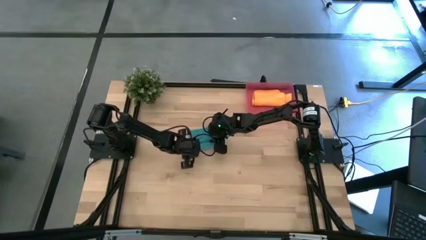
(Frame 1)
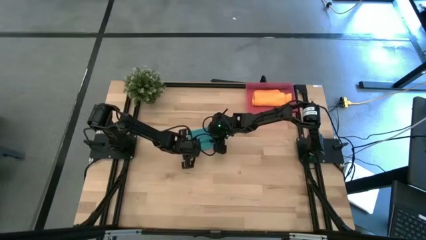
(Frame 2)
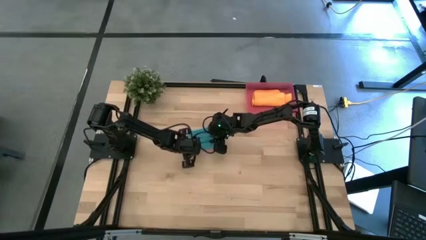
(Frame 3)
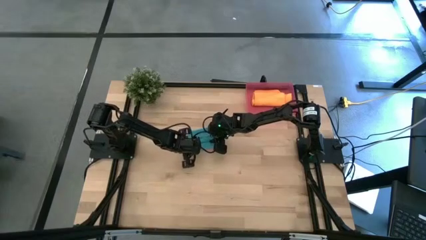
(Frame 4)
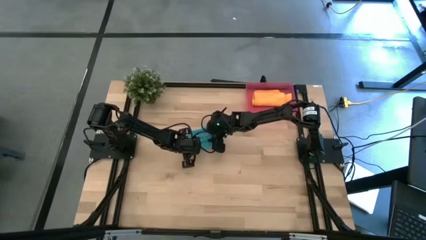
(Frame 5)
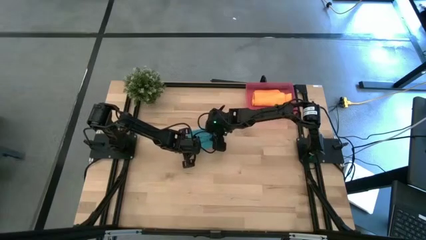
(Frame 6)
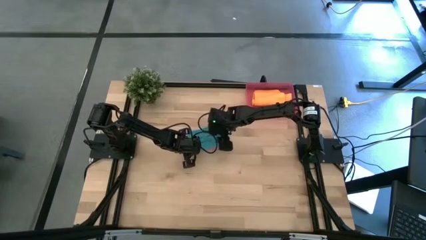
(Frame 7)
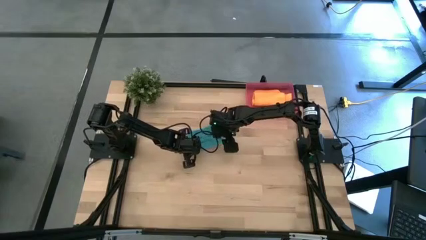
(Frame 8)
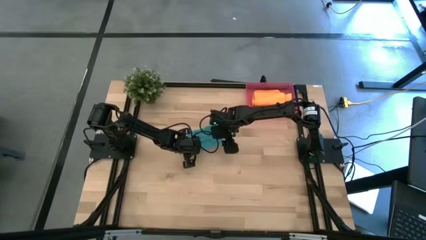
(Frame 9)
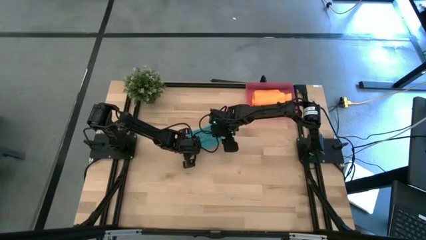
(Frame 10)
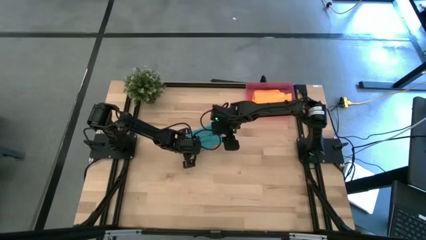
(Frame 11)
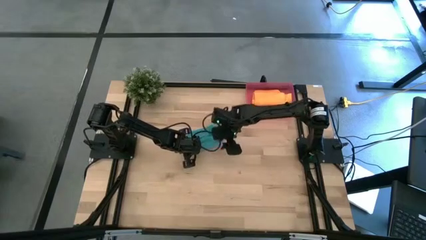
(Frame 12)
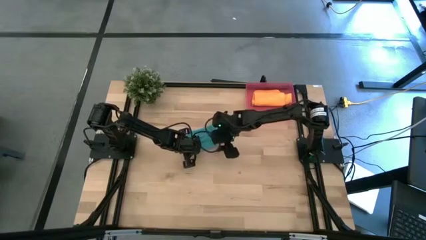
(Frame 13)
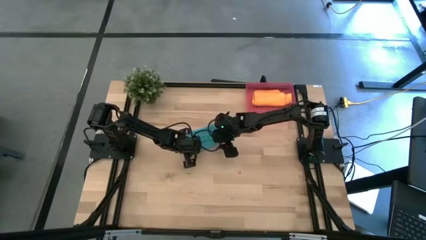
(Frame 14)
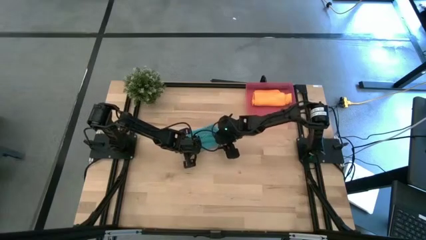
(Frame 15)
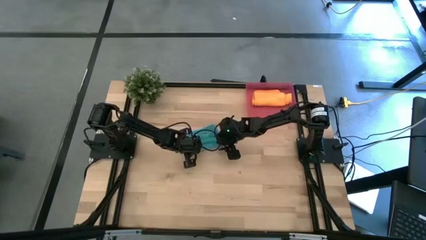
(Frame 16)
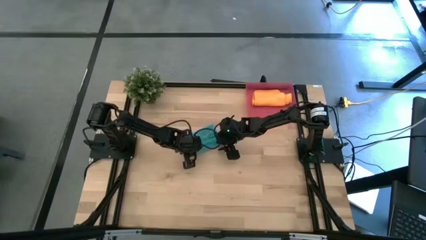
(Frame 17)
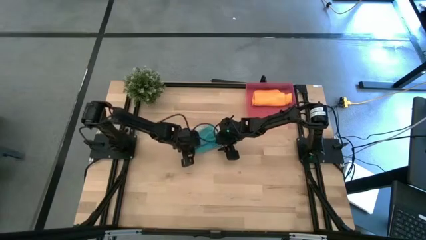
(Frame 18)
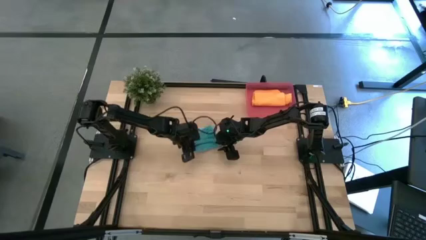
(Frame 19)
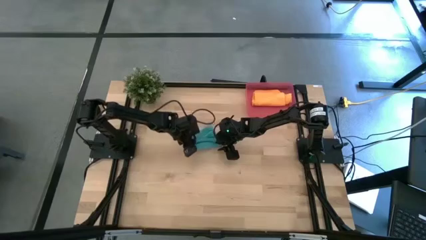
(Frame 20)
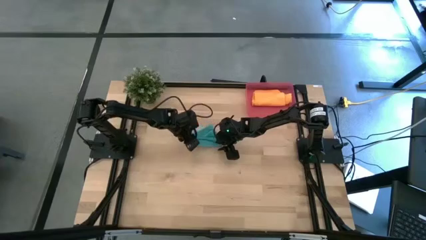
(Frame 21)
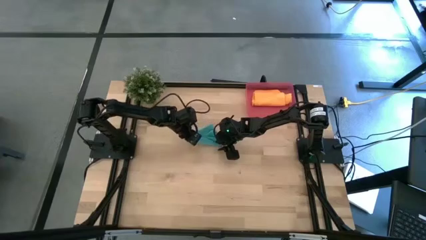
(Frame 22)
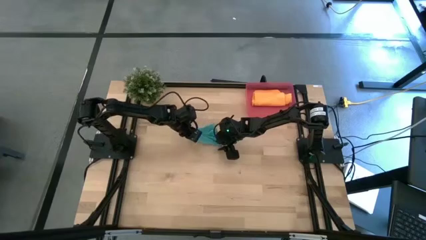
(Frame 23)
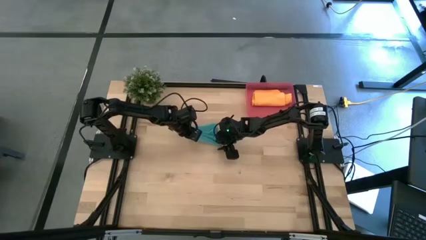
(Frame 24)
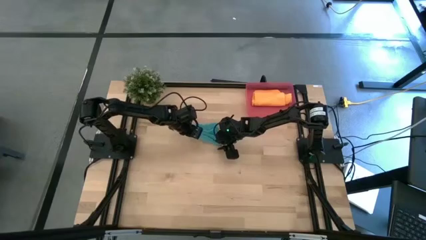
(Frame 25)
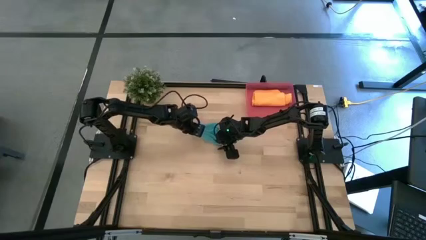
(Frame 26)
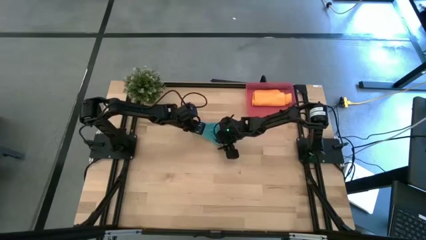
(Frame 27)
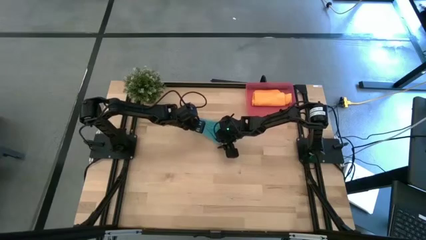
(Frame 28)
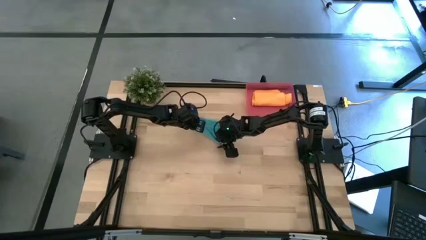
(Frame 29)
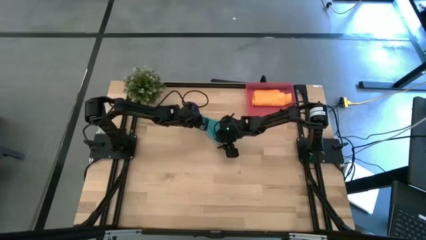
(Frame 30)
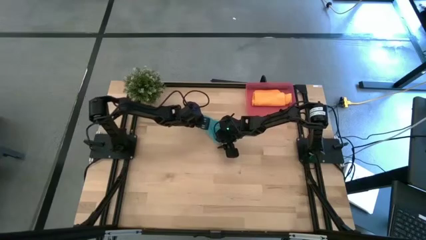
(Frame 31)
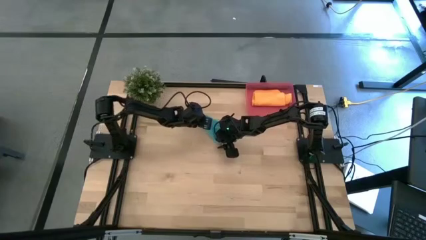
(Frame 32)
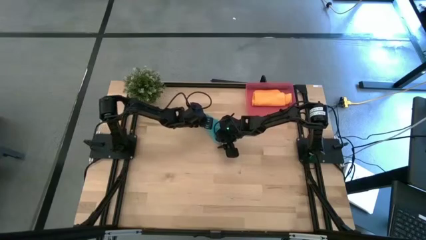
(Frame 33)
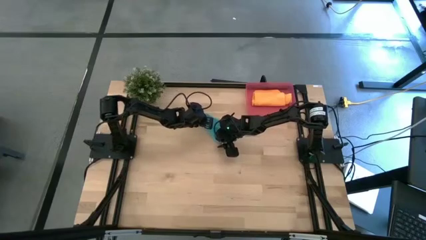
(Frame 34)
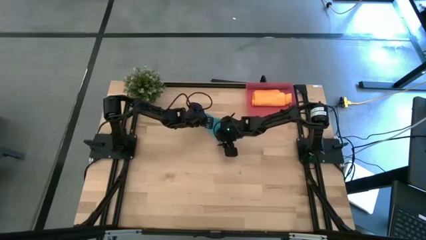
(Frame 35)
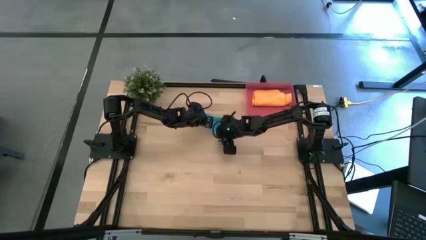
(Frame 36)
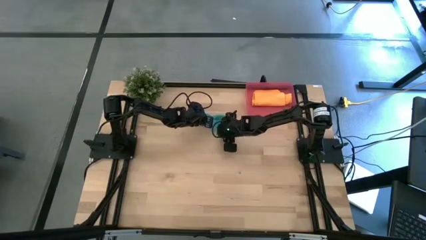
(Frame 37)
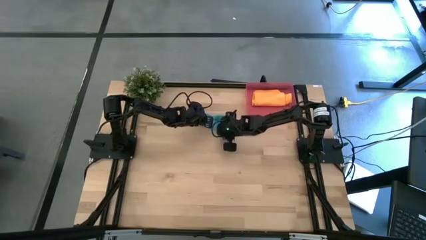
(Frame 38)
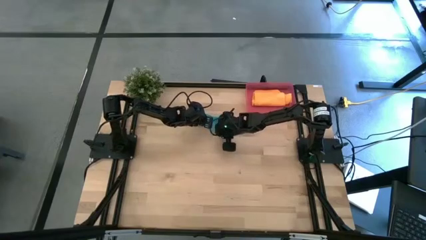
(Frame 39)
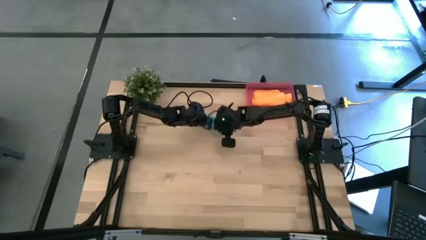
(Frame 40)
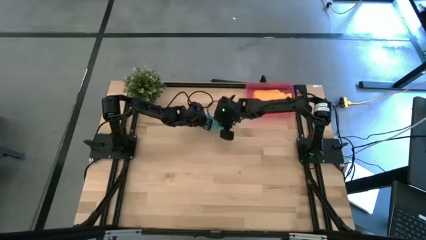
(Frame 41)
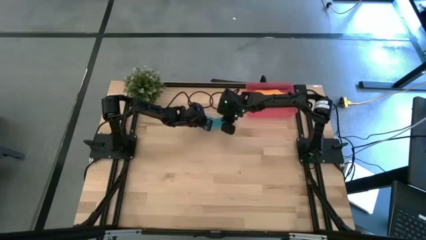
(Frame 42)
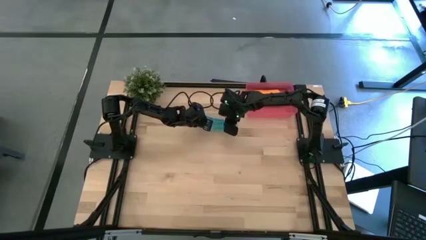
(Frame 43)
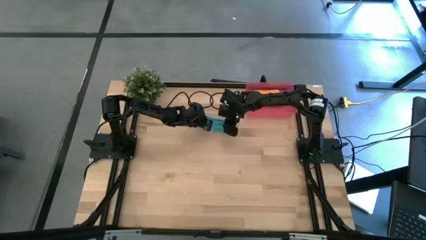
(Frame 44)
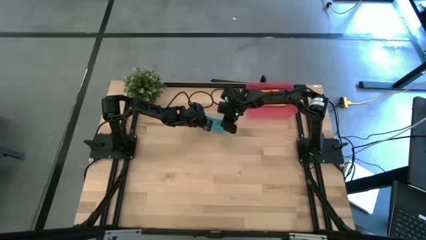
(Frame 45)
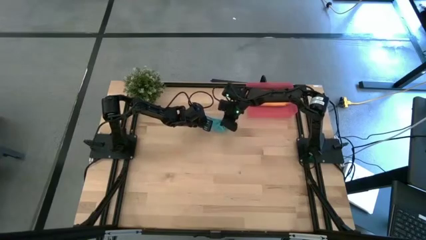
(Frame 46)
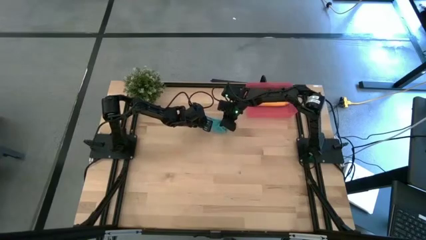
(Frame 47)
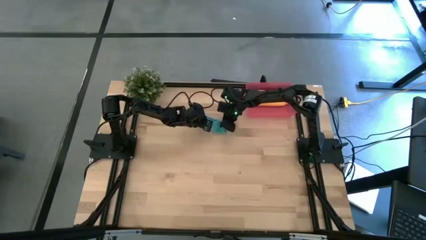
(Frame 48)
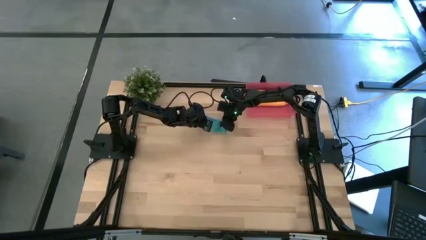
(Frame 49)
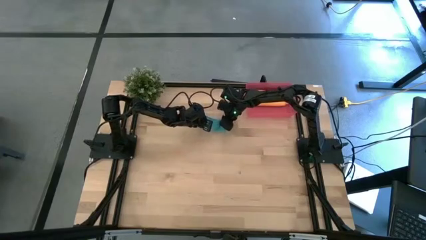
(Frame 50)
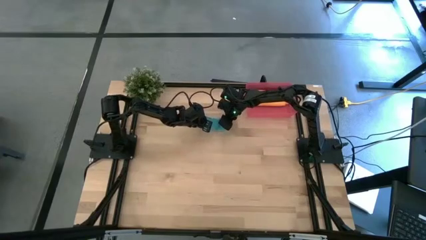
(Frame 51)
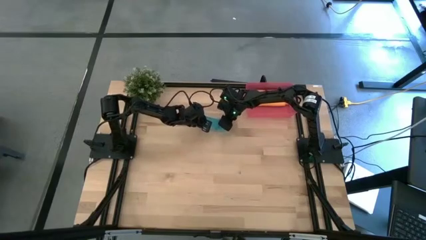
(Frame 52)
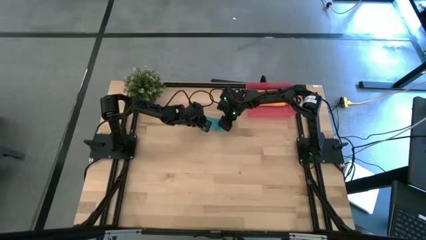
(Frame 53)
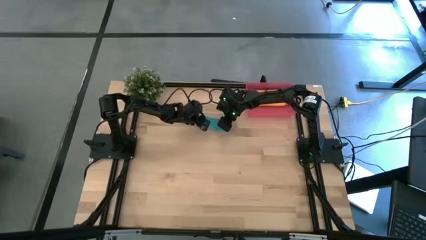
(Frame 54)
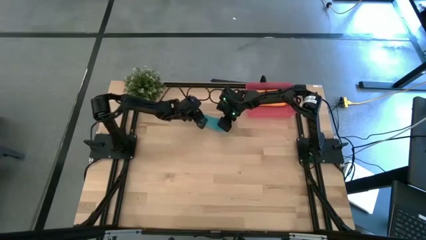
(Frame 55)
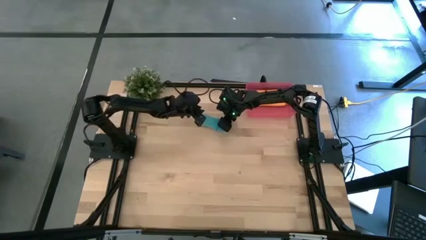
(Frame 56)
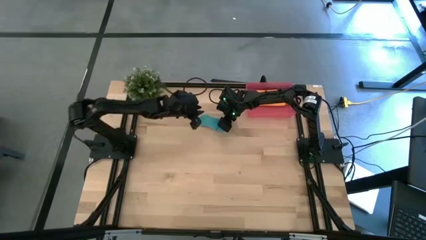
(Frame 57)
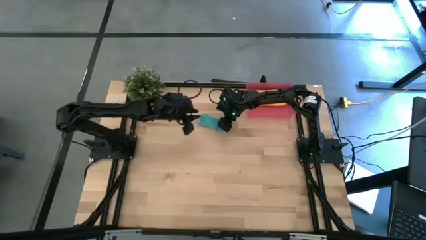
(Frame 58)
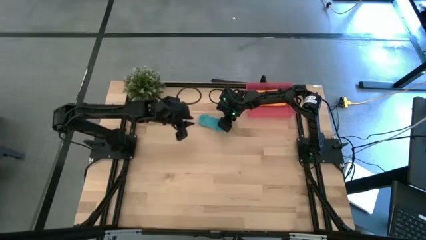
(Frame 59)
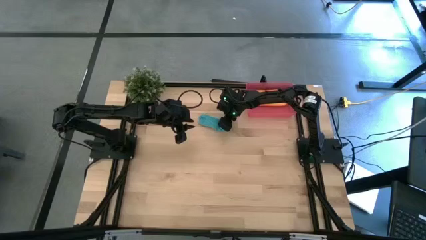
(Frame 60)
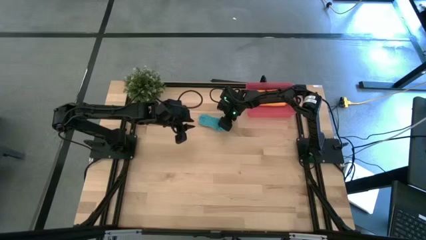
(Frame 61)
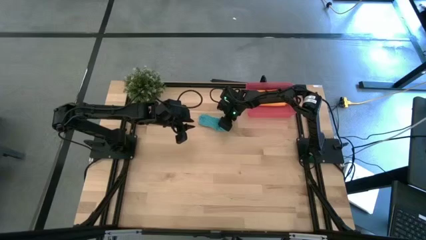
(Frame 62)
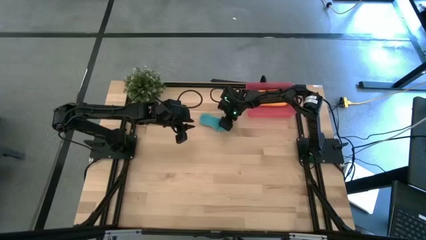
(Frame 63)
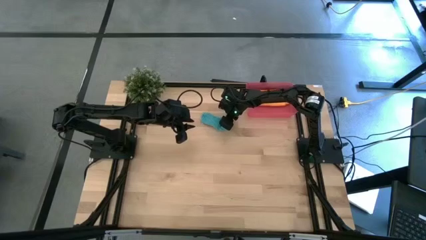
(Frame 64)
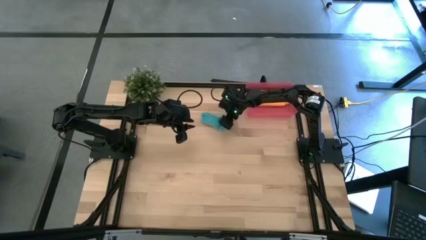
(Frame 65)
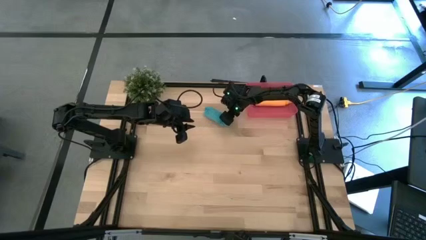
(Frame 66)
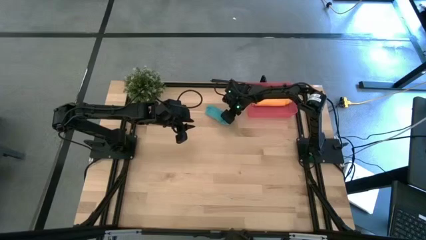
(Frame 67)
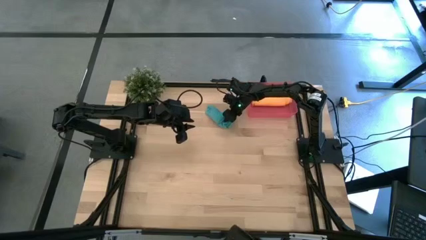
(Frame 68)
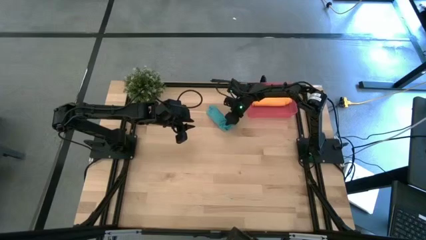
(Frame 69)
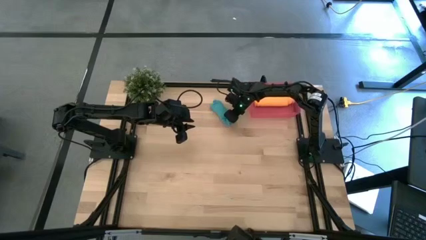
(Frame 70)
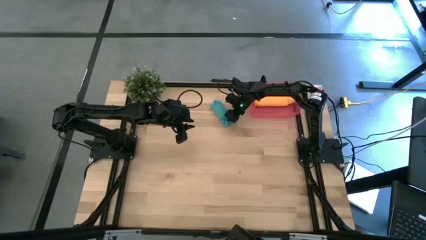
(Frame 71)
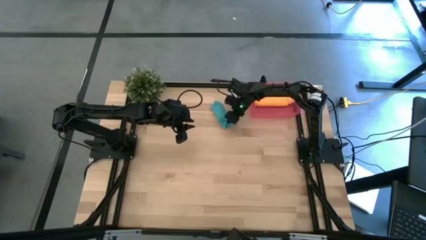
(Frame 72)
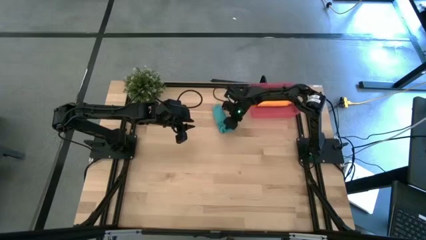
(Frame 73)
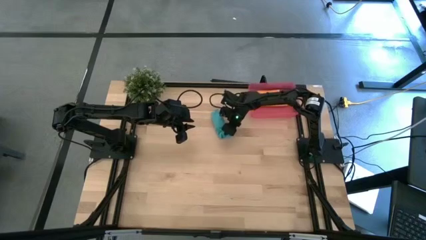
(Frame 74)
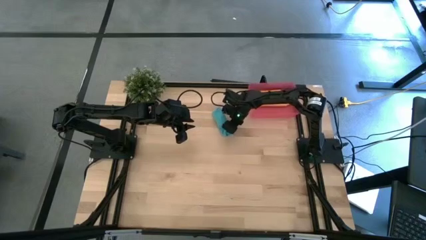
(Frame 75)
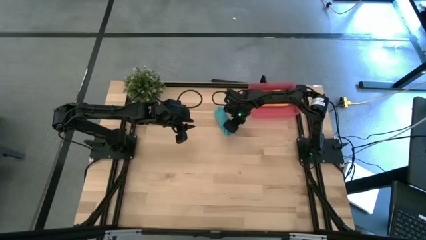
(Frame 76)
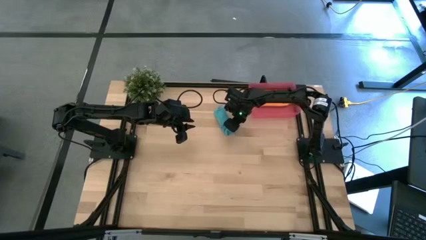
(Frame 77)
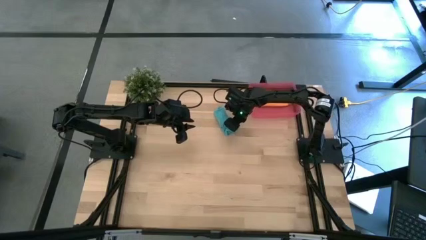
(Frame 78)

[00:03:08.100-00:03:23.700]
Task: Roll microfiber towels into tight, uniform cylinder then place into a basket
Roll the blue microfiber towel
